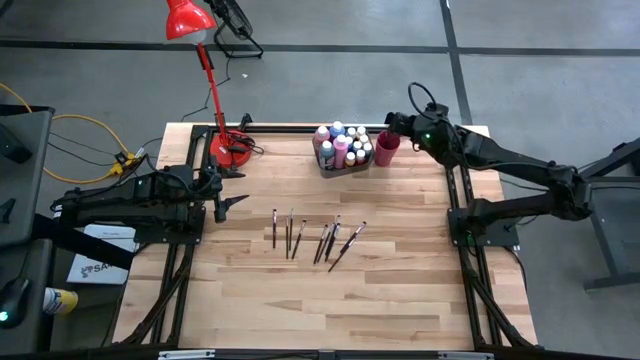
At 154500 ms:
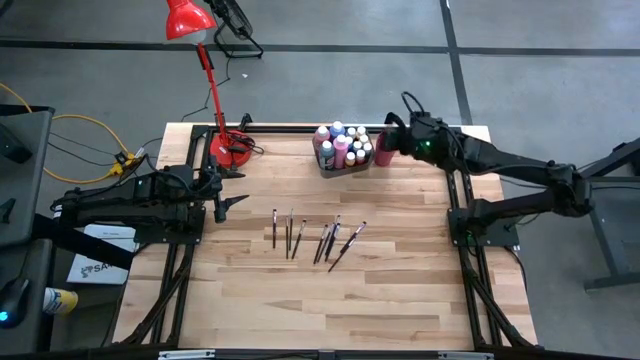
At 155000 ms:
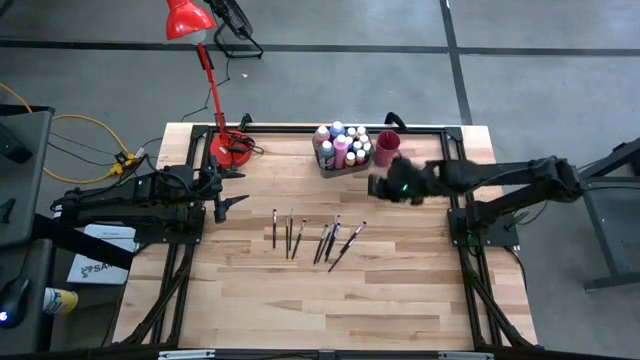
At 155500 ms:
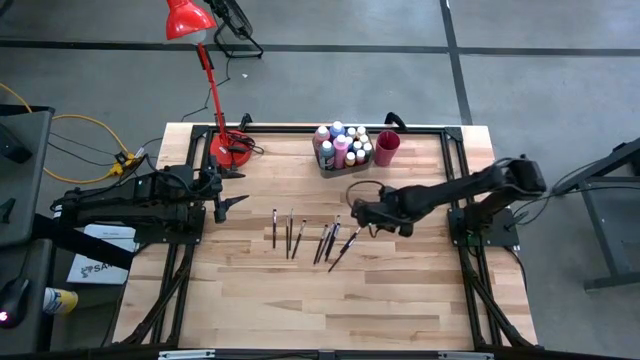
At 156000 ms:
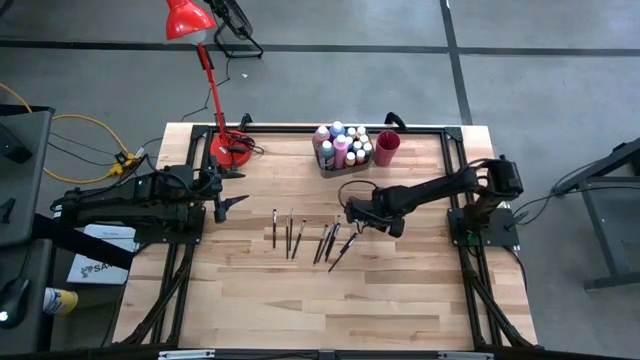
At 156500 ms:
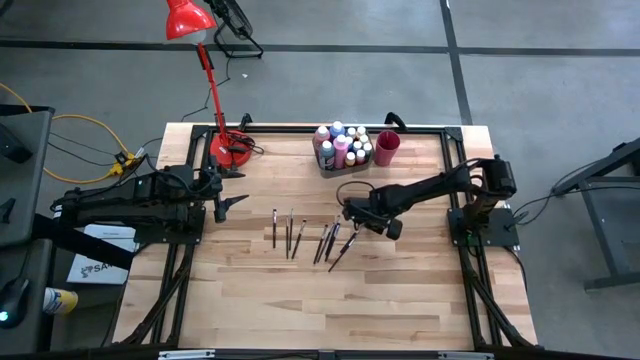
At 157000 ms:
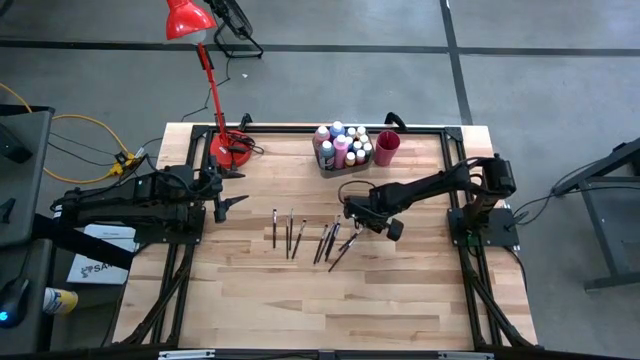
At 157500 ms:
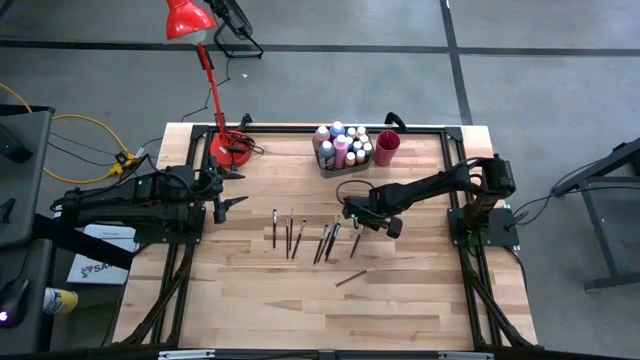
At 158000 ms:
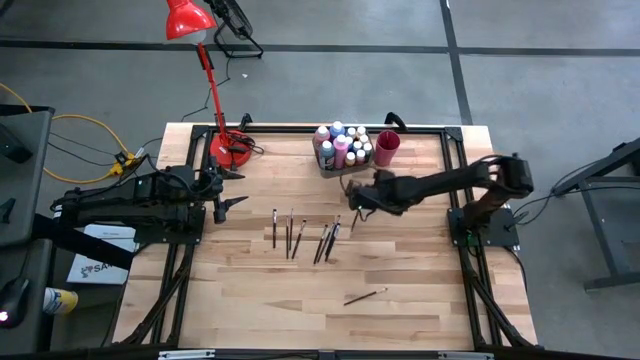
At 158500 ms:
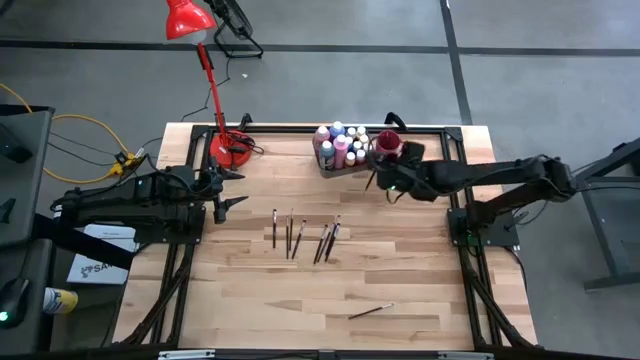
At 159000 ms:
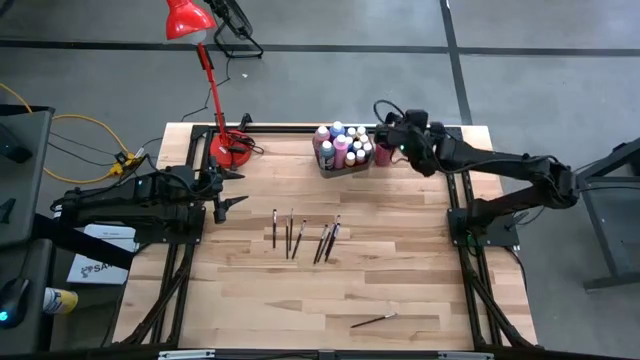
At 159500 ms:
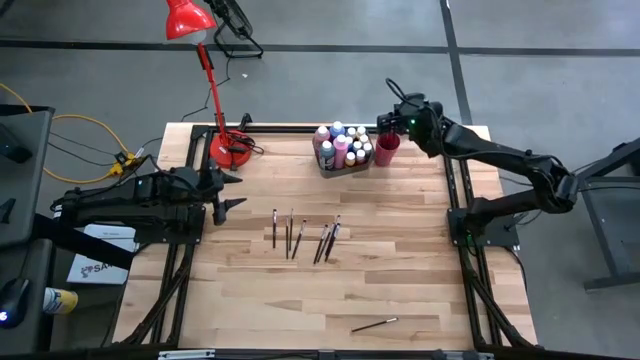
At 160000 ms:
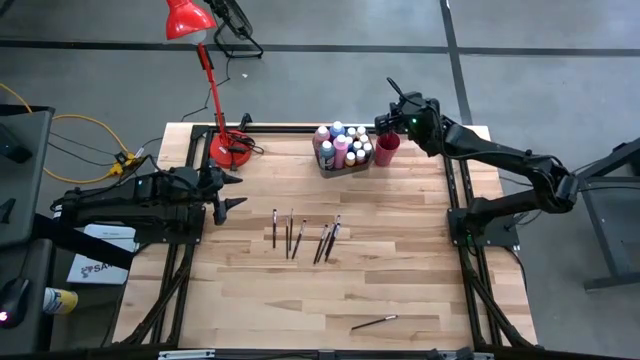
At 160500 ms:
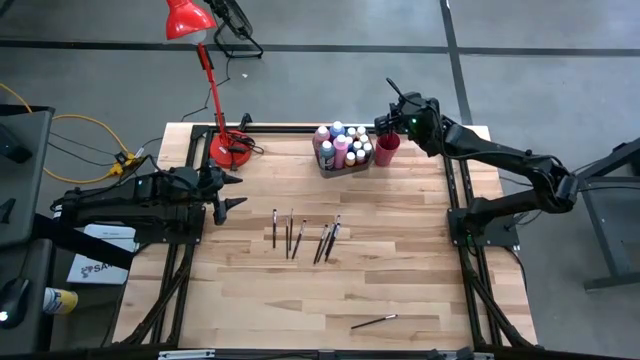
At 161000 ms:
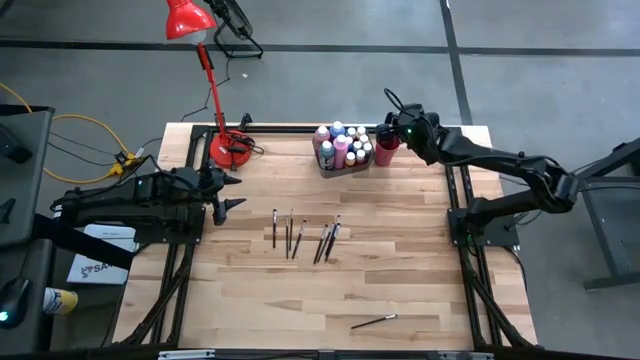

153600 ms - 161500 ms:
Task: Pick & Place Paint Supplies
Put the black paintbrush into the red cup

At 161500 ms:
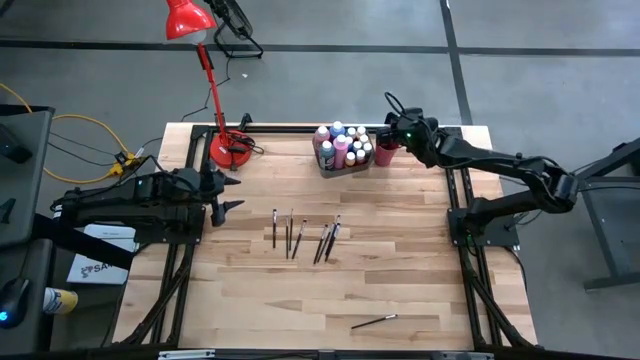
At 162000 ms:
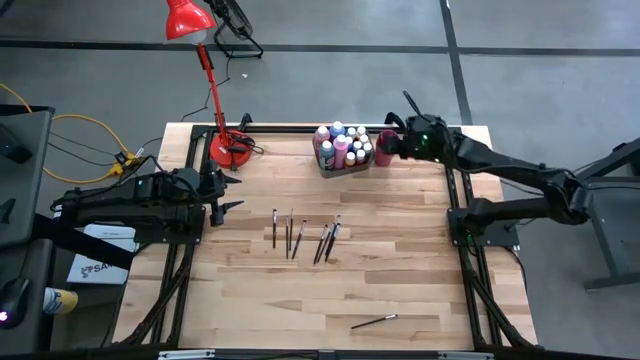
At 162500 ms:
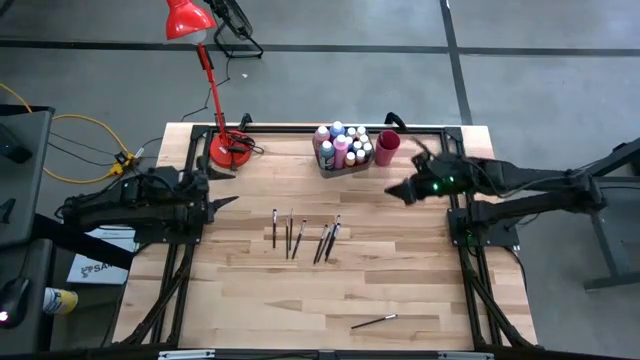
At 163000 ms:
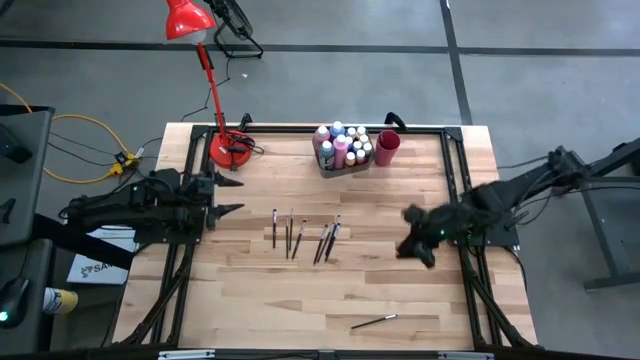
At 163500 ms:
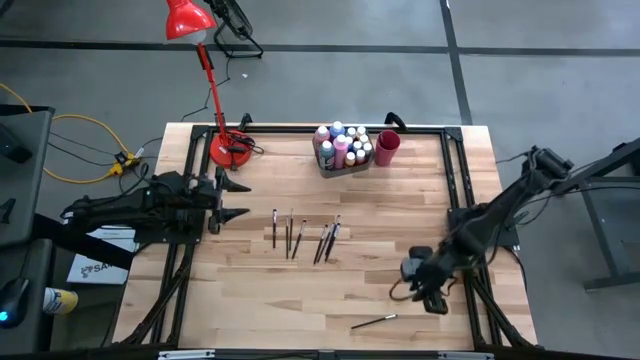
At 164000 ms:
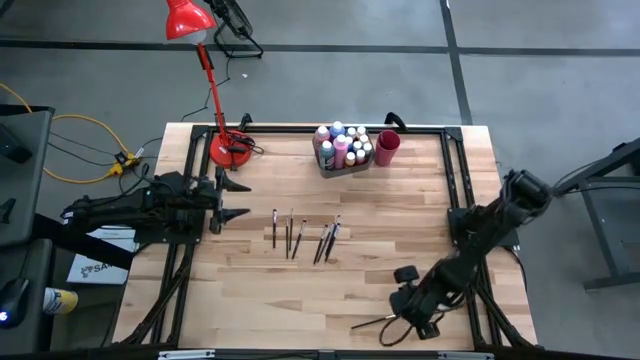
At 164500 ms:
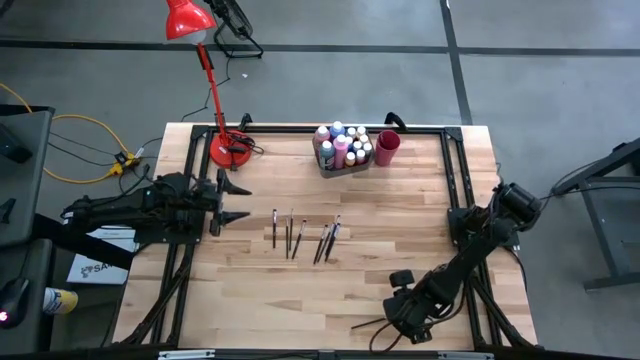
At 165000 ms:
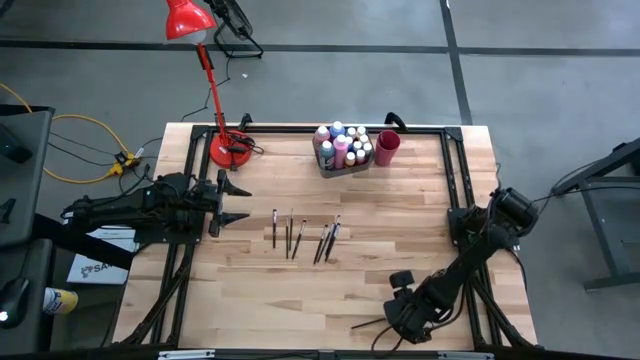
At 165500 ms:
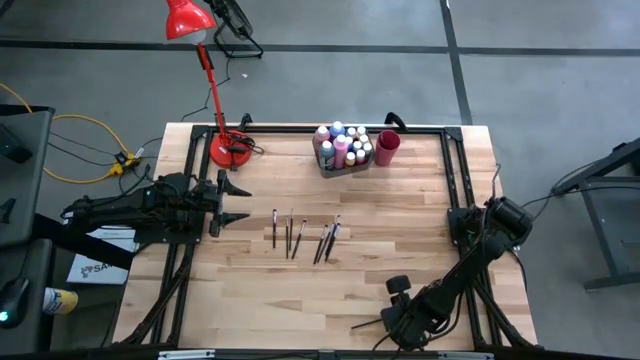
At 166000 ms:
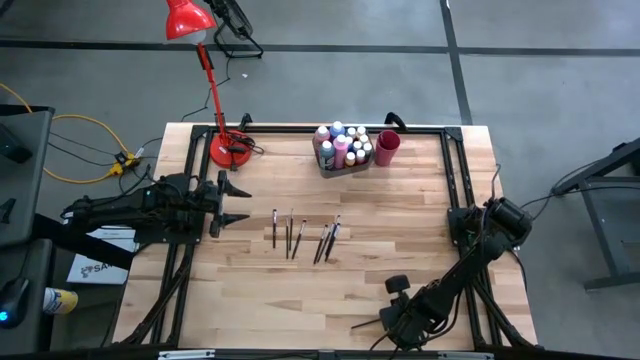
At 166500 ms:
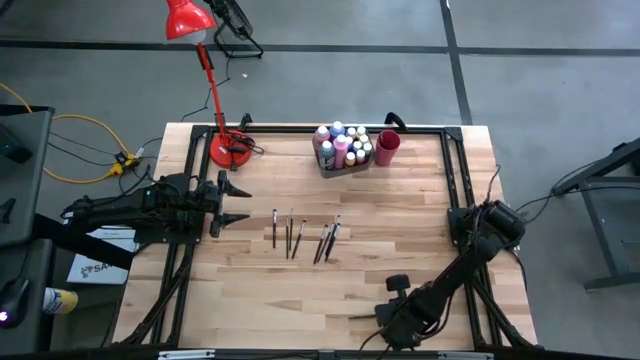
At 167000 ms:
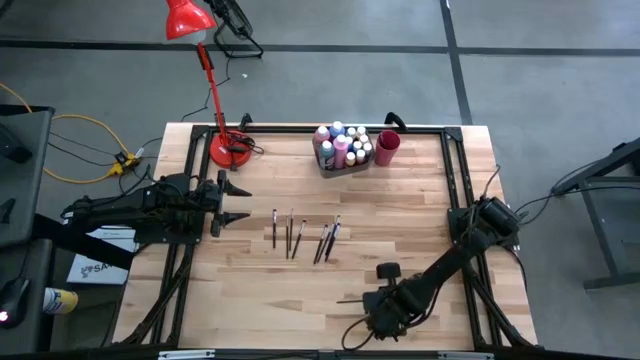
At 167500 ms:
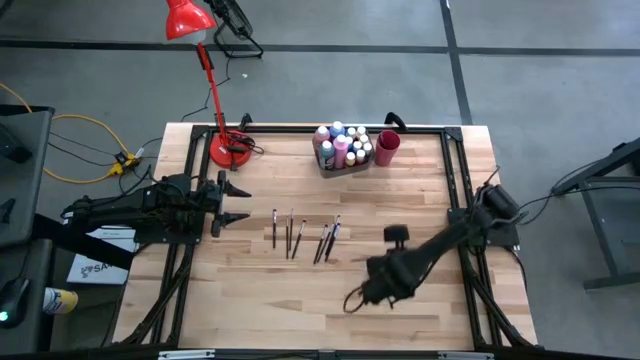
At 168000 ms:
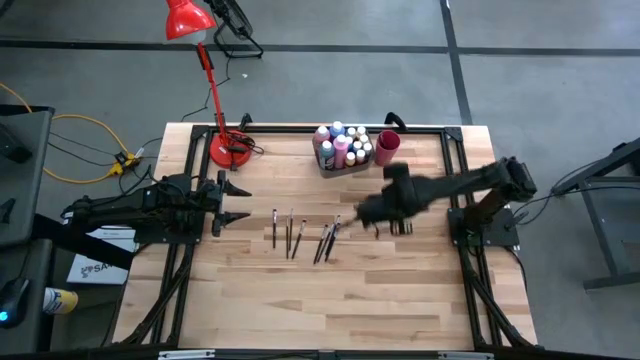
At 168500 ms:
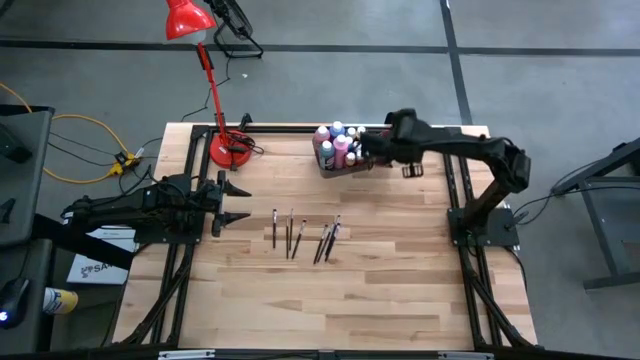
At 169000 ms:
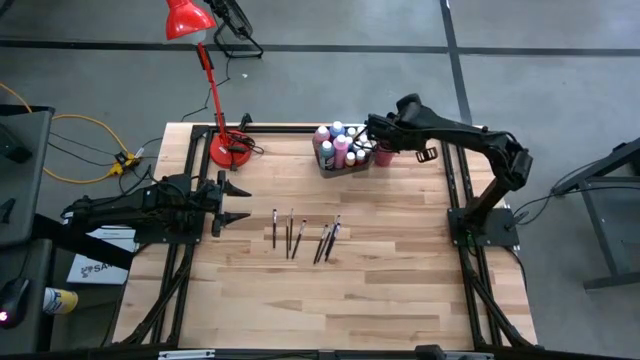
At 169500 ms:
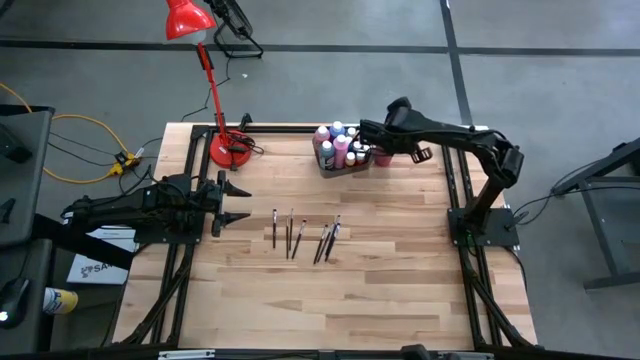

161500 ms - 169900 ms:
Put the black paintbrush into the red cup

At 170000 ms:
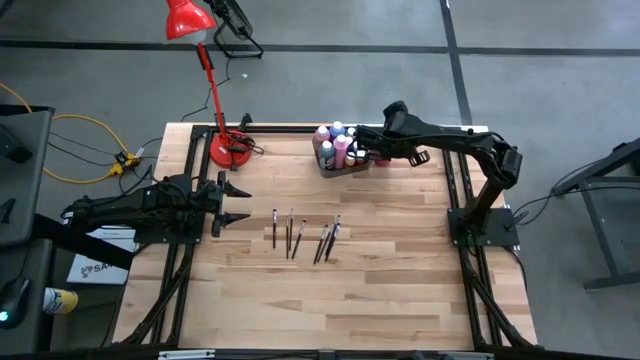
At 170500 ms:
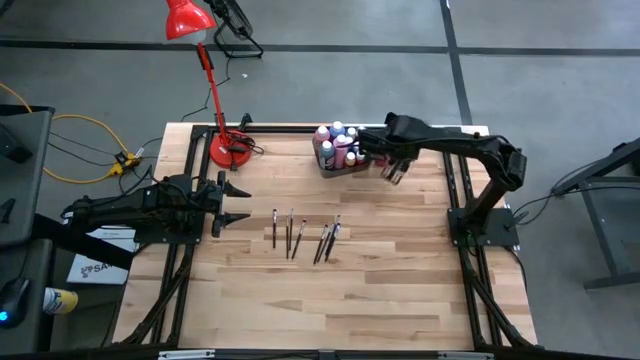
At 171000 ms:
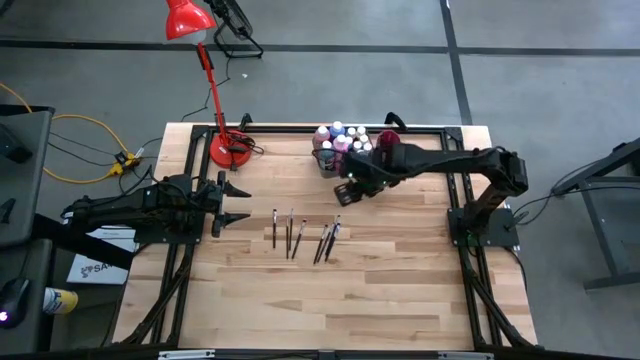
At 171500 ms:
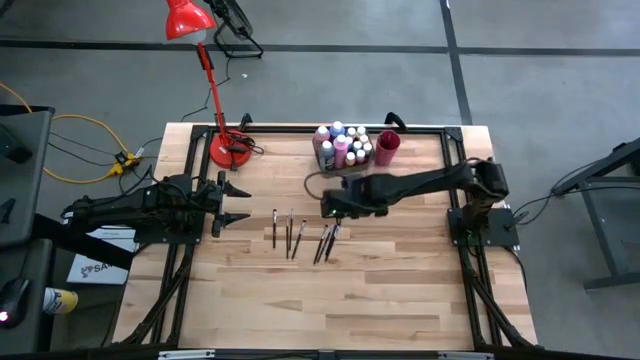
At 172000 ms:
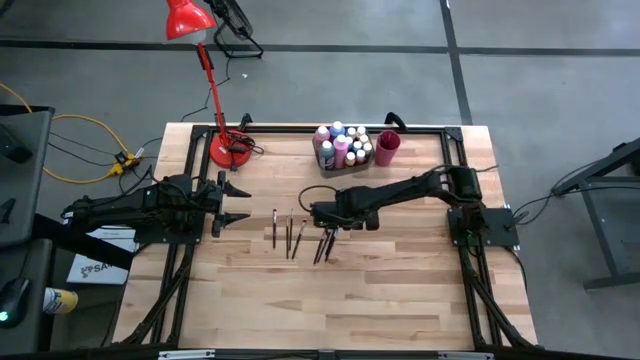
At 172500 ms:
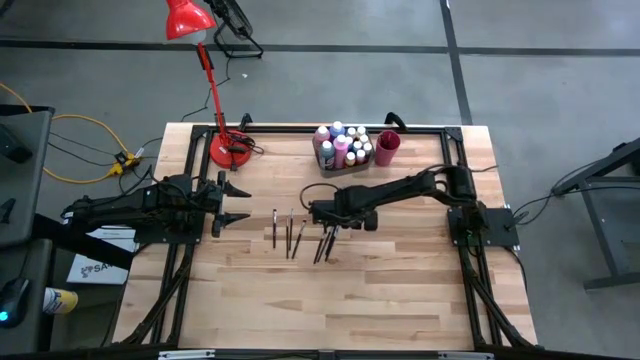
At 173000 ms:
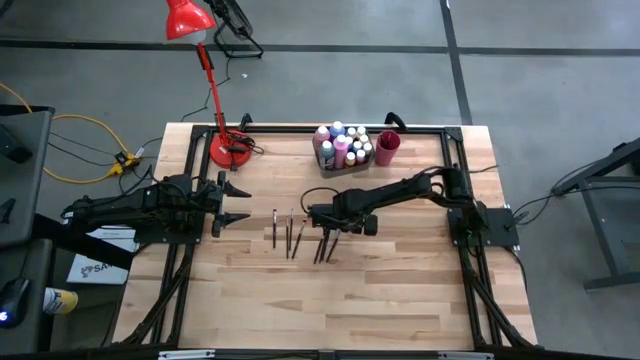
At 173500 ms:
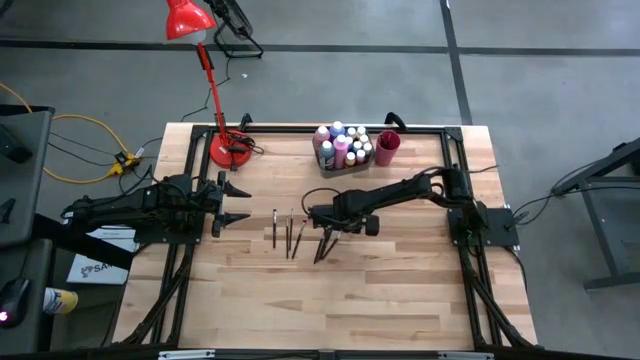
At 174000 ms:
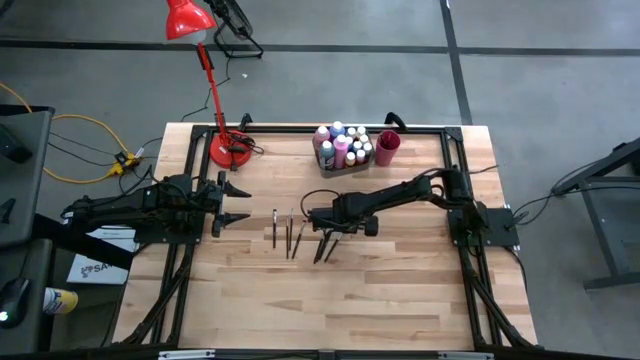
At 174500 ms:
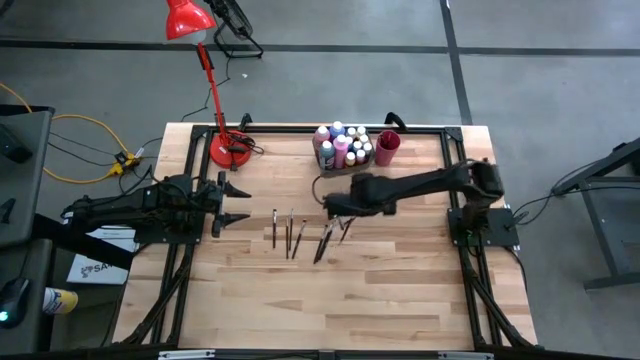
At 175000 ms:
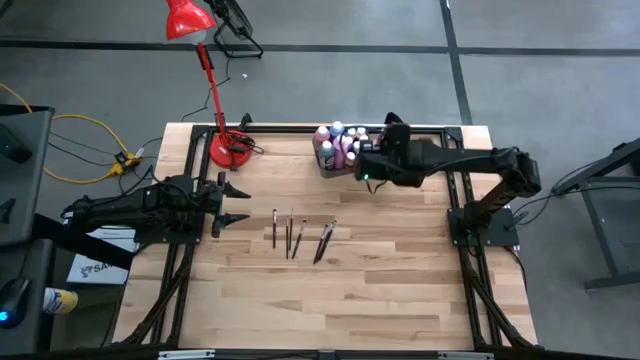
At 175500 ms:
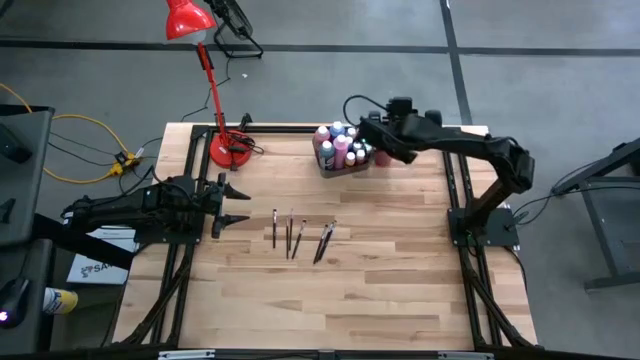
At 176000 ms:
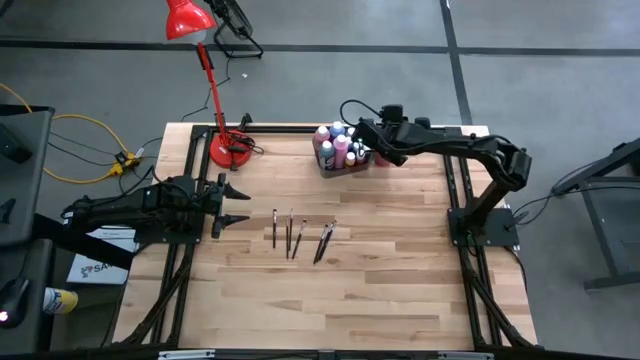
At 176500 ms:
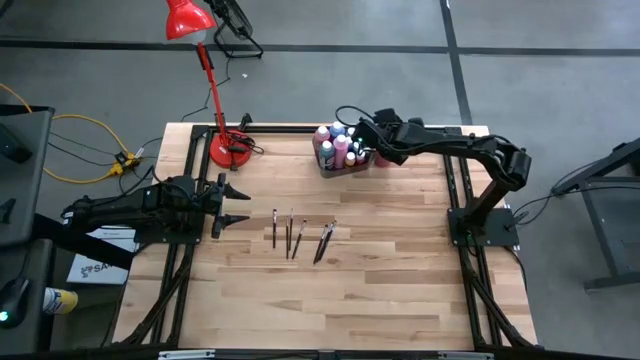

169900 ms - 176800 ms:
Put the black paintbrush into the red cup
